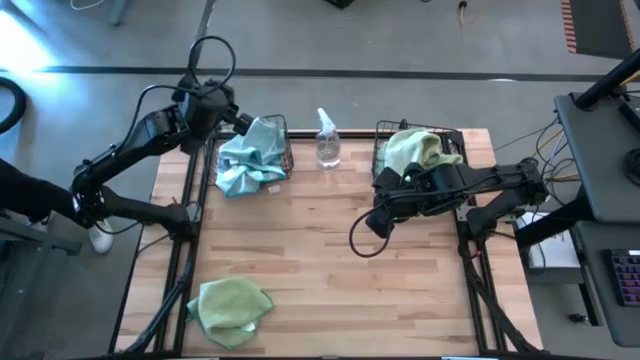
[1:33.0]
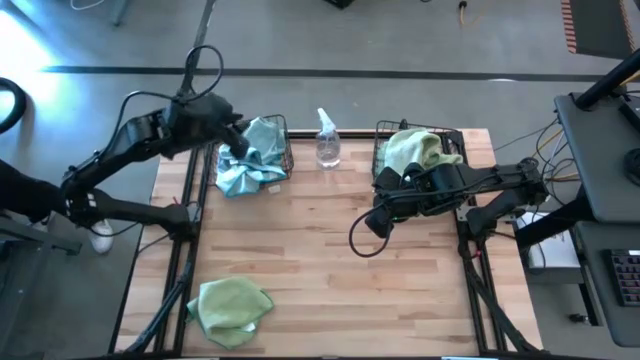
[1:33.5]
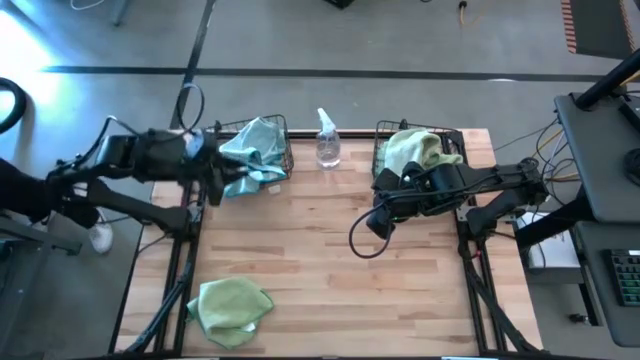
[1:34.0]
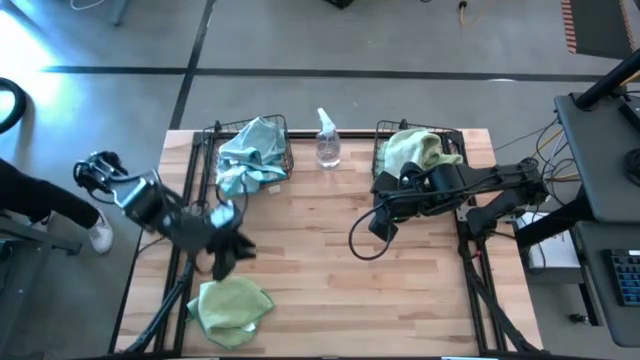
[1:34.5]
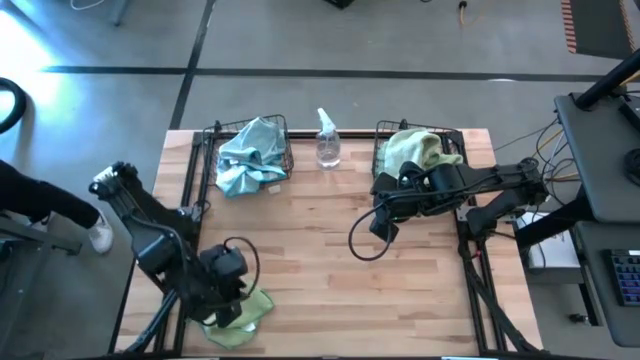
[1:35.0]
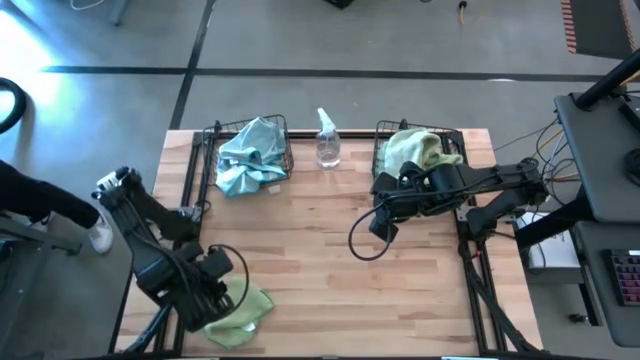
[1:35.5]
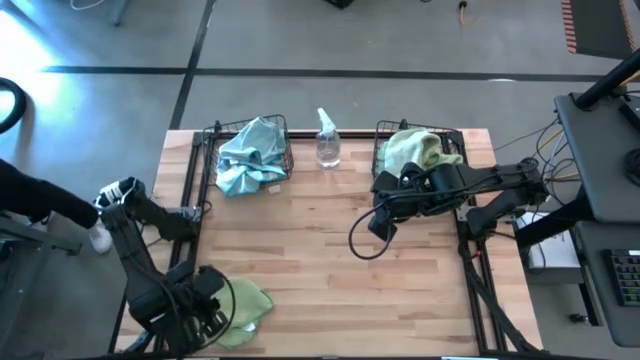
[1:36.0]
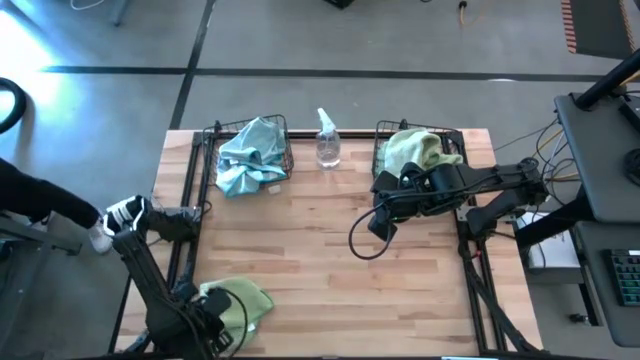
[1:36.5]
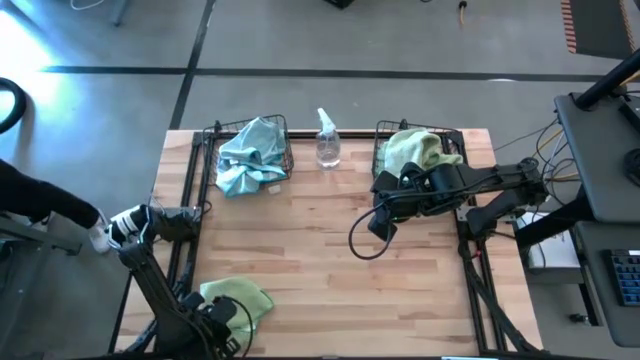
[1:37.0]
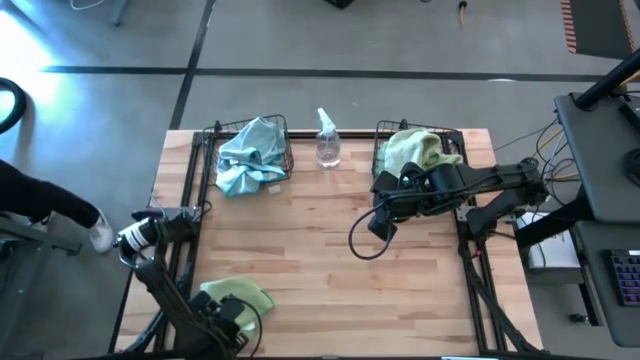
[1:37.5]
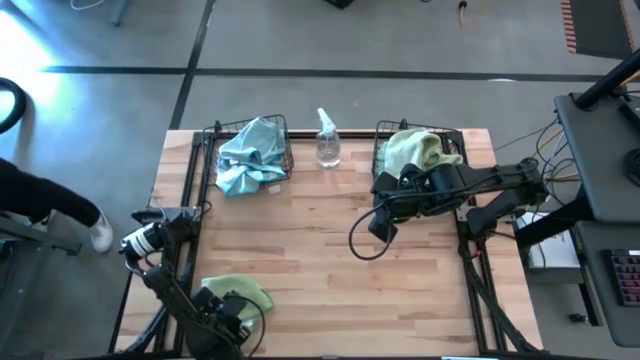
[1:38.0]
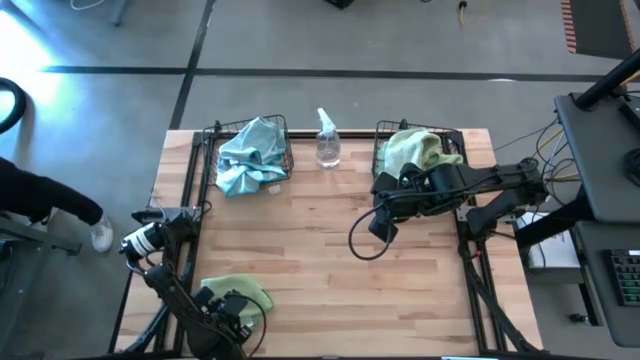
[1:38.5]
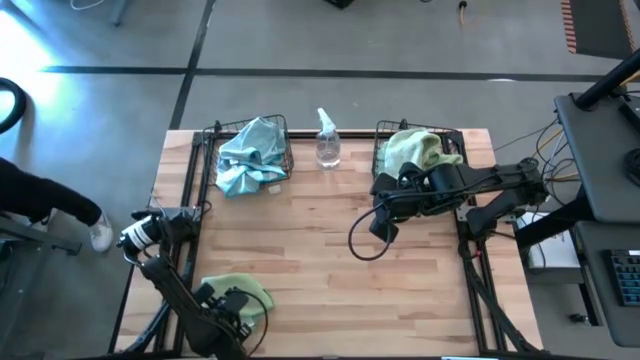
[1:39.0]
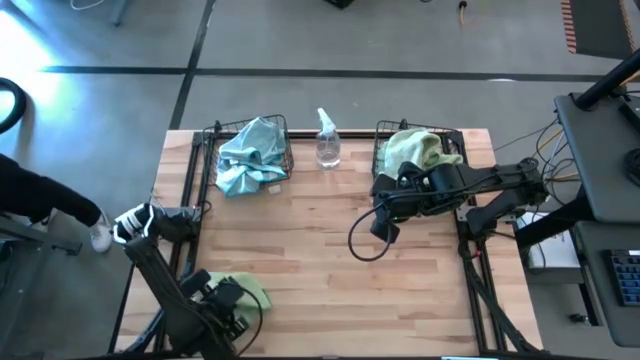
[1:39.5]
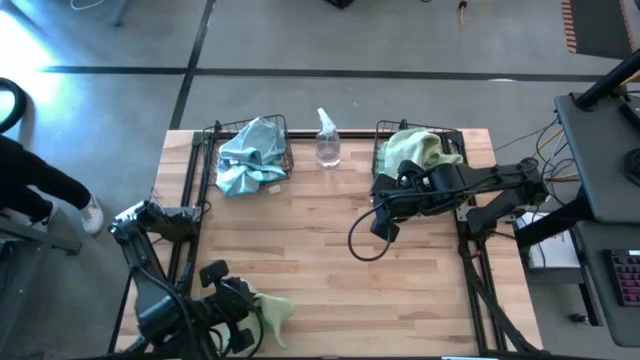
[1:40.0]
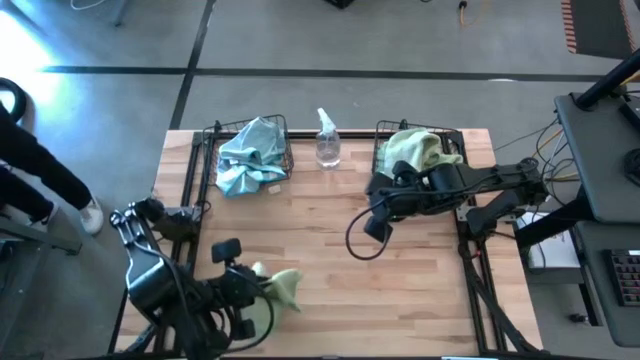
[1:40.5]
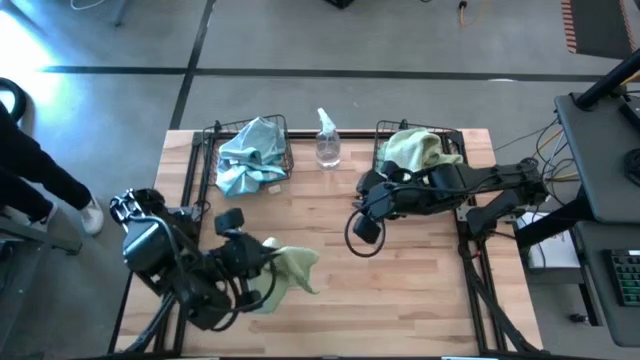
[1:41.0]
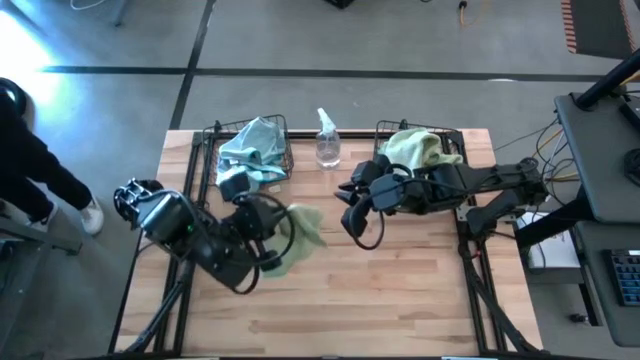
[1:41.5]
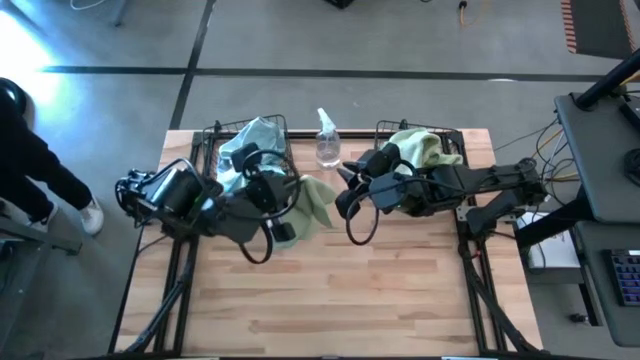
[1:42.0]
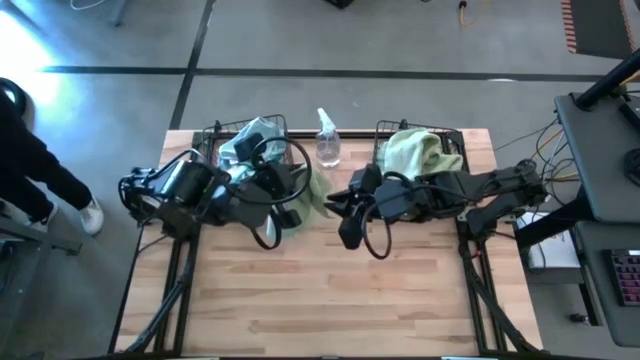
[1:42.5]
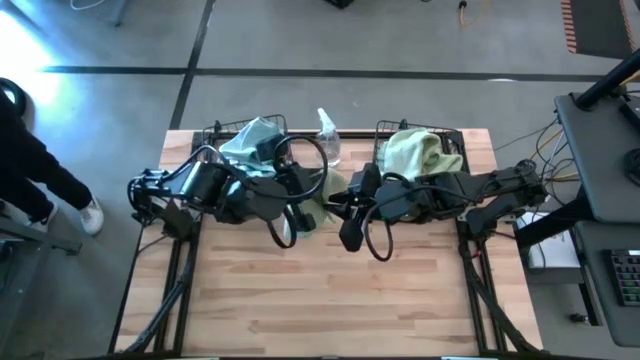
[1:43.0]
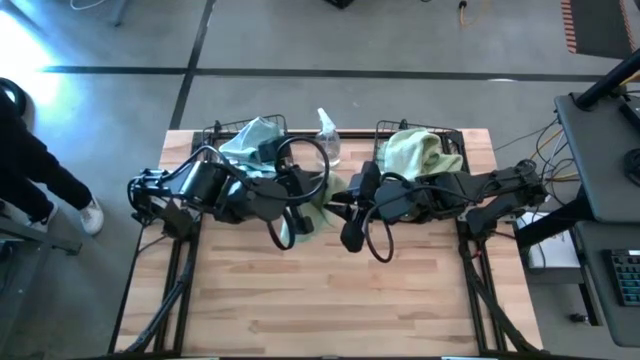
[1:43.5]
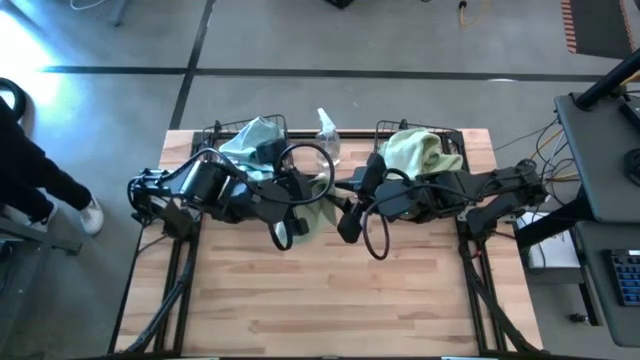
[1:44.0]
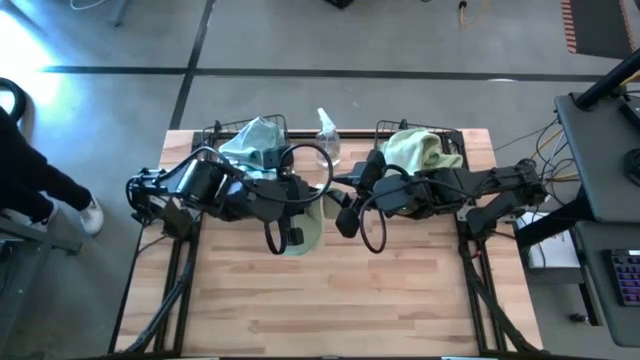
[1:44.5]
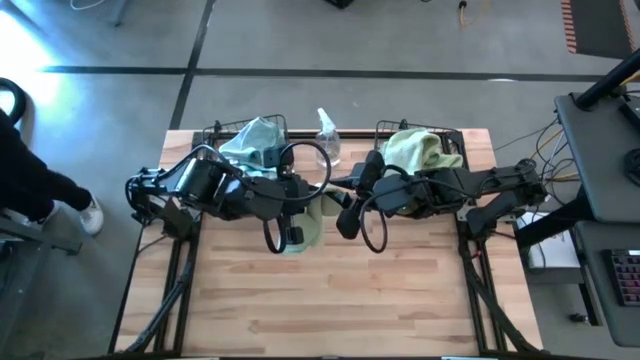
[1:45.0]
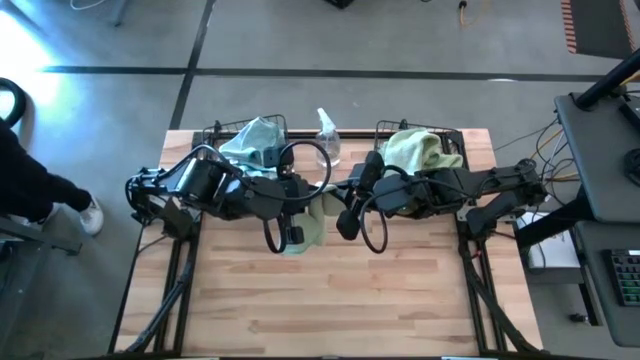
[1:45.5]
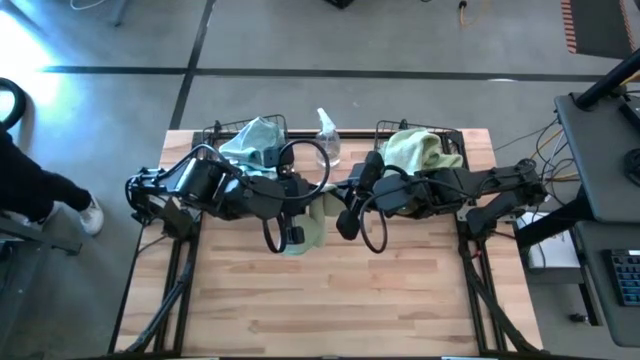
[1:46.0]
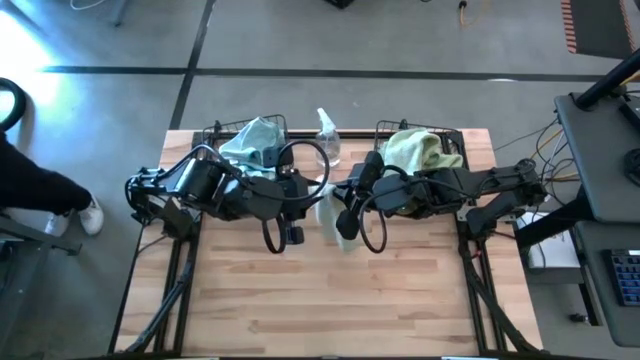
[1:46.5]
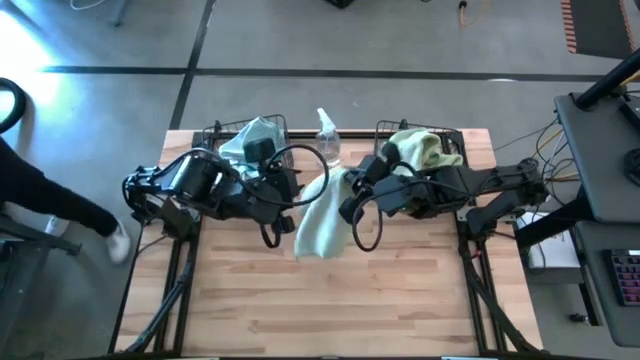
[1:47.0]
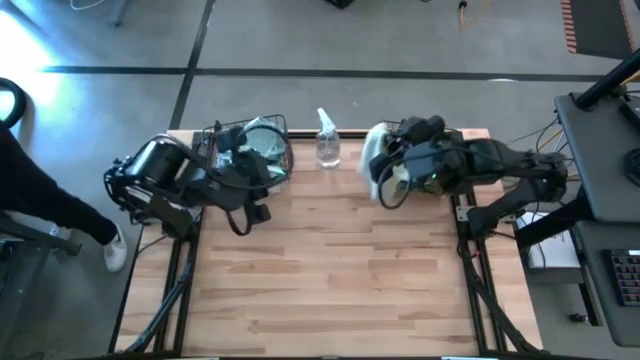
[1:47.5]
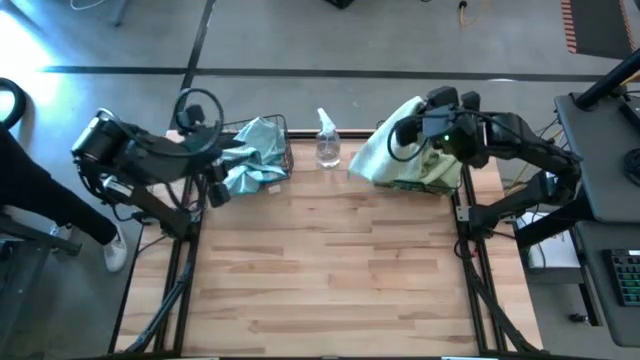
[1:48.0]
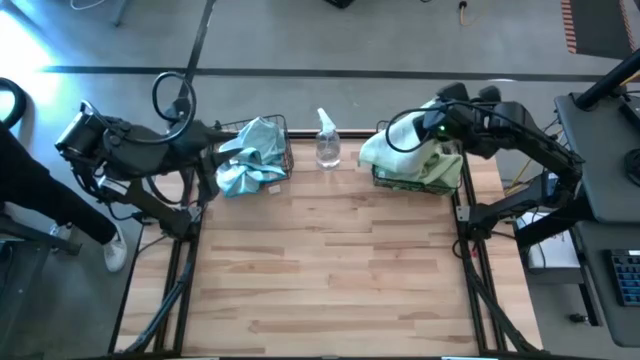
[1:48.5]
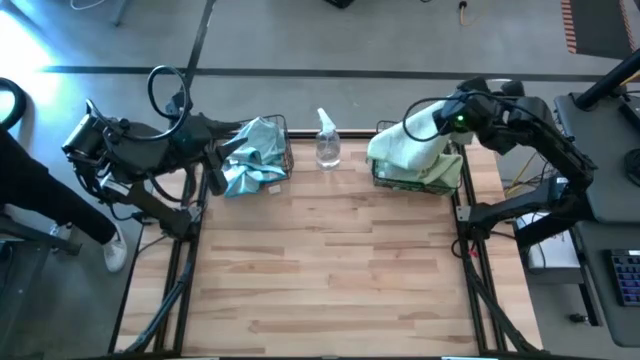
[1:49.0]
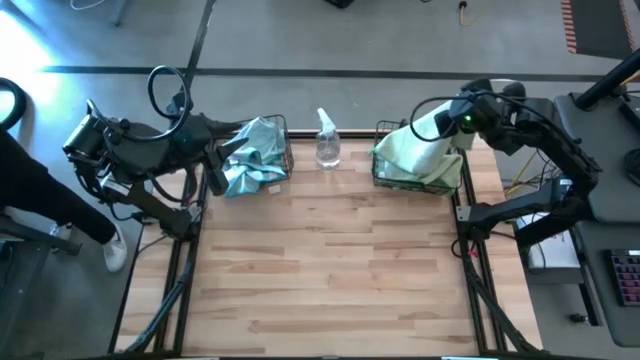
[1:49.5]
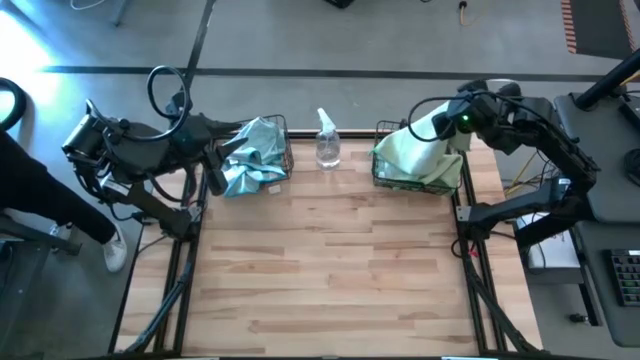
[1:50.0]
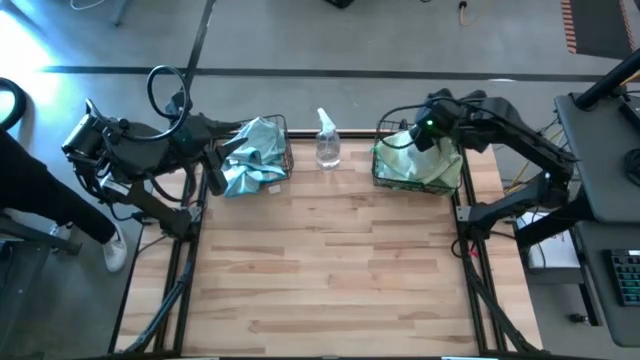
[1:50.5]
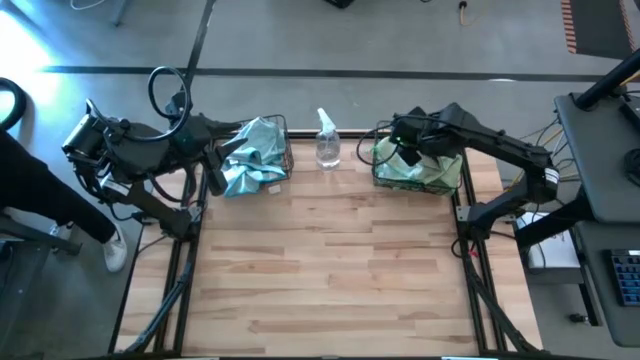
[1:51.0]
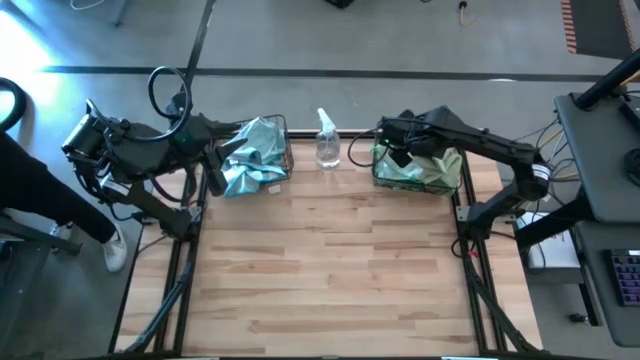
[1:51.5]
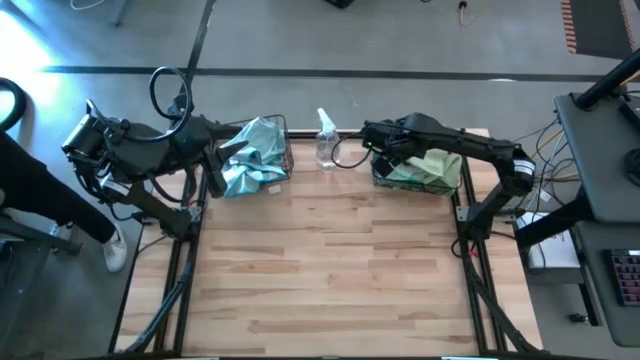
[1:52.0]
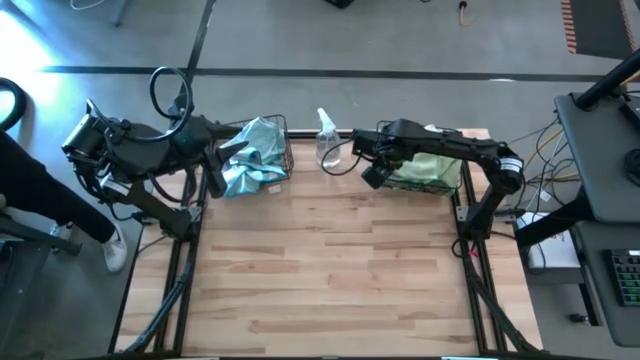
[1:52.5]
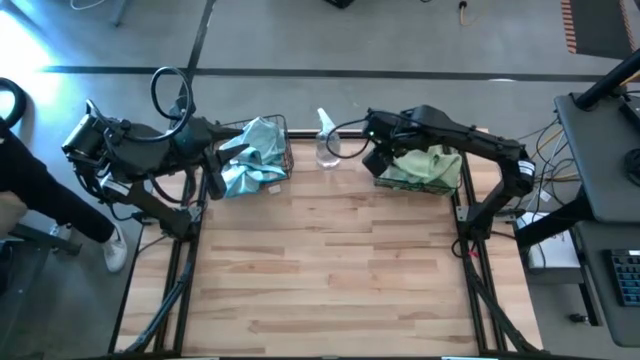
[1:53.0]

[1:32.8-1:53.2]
Task: Sort microfiber towel by color & place in baskets
Put the green microfiber cloth into the right wire basket
